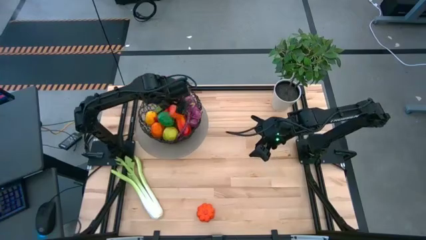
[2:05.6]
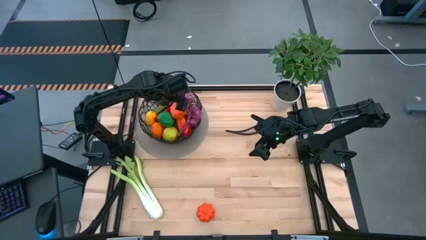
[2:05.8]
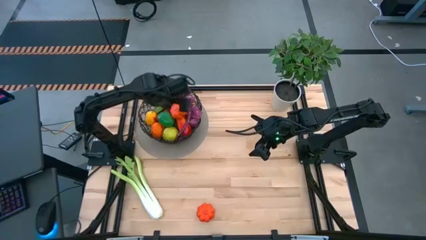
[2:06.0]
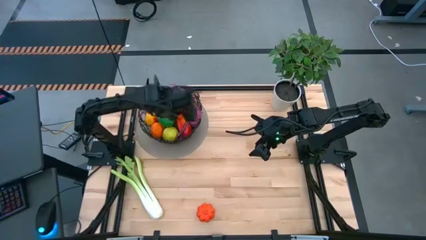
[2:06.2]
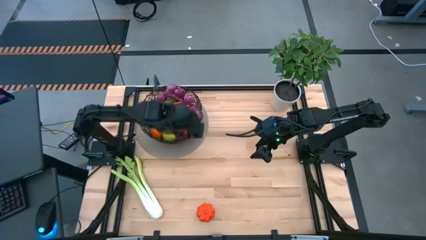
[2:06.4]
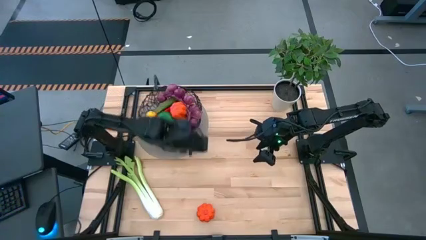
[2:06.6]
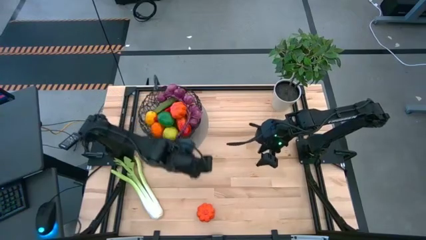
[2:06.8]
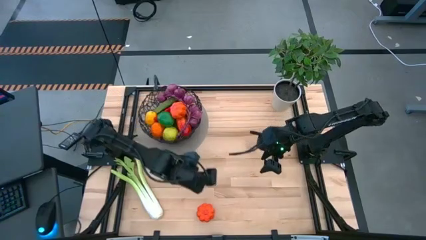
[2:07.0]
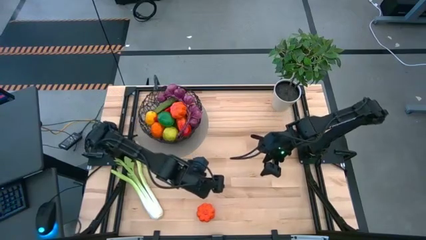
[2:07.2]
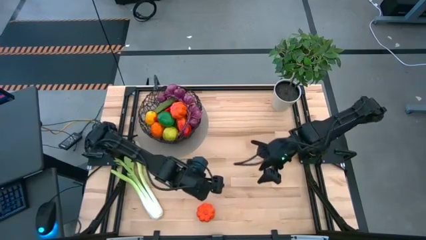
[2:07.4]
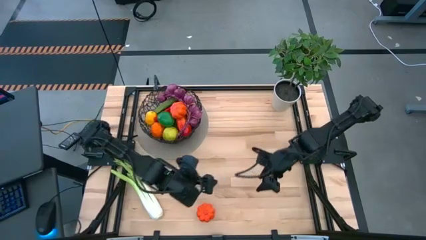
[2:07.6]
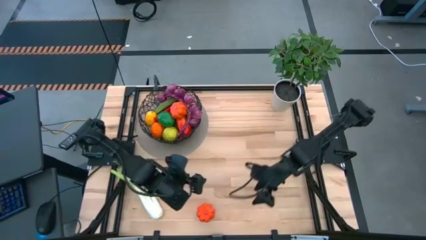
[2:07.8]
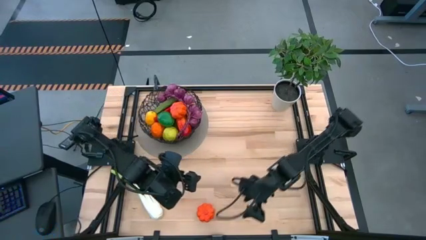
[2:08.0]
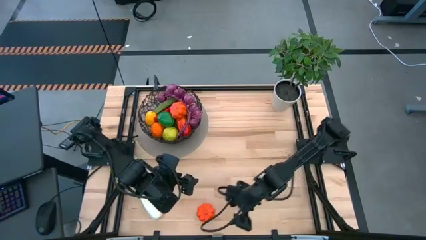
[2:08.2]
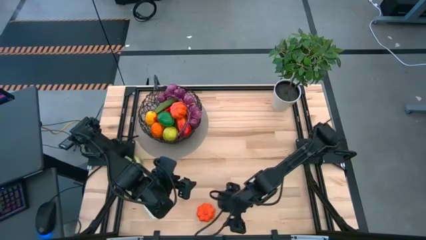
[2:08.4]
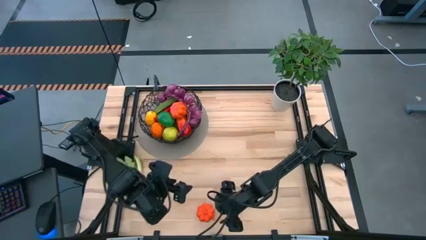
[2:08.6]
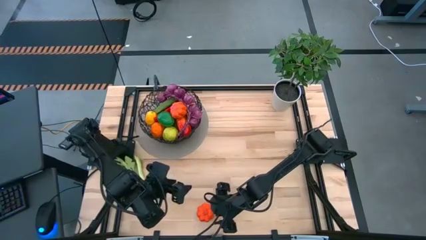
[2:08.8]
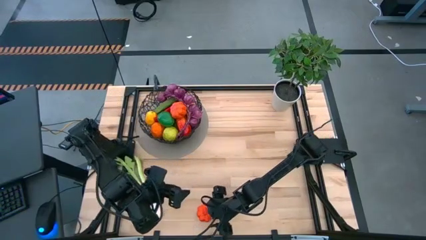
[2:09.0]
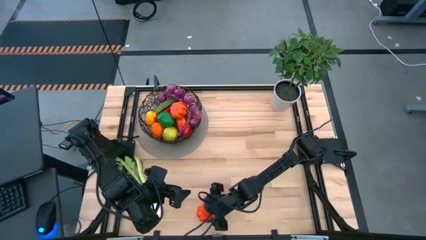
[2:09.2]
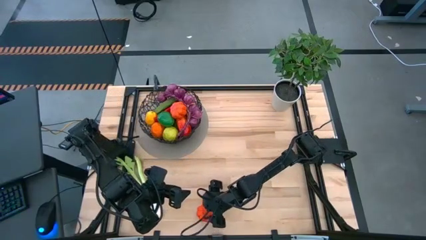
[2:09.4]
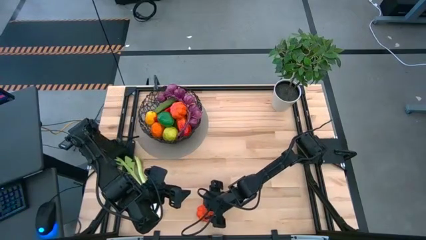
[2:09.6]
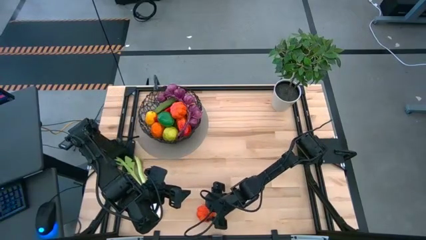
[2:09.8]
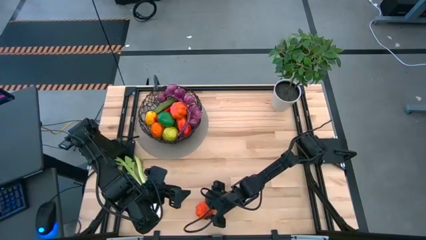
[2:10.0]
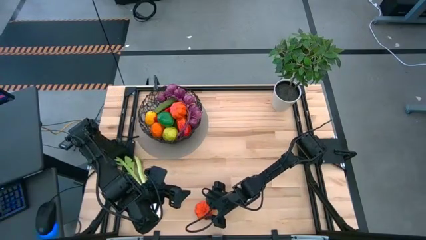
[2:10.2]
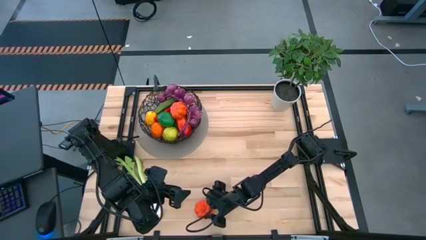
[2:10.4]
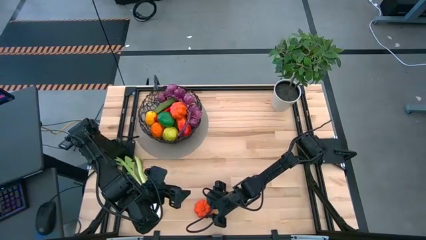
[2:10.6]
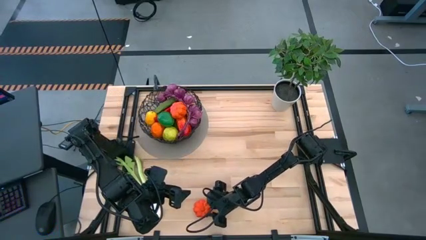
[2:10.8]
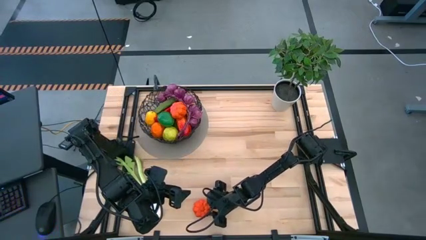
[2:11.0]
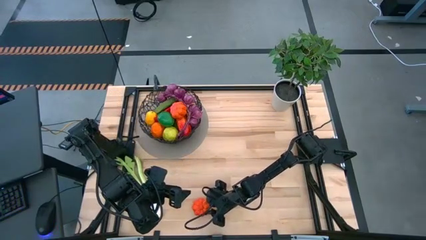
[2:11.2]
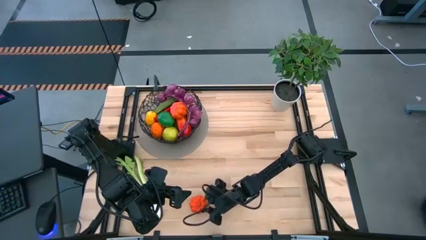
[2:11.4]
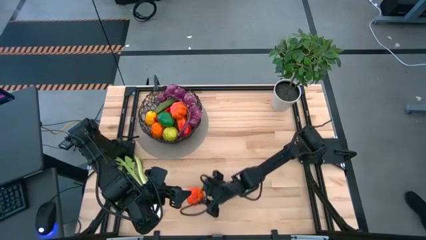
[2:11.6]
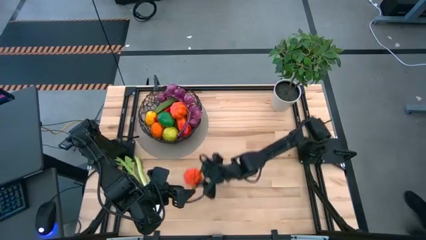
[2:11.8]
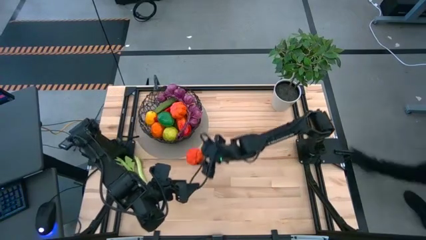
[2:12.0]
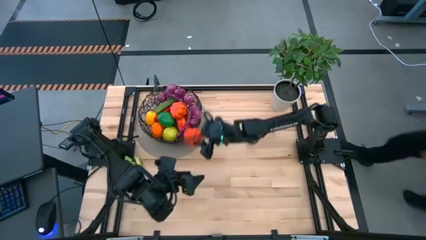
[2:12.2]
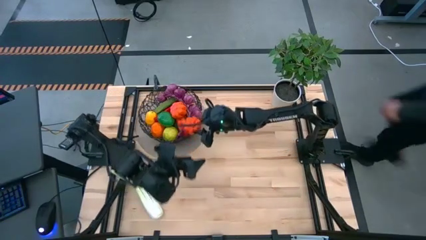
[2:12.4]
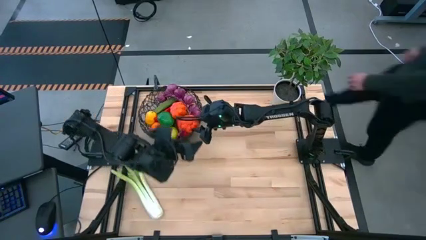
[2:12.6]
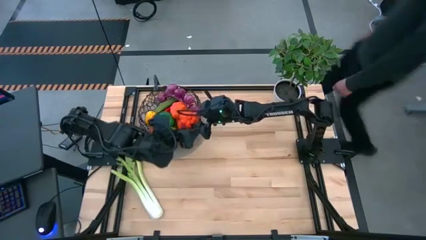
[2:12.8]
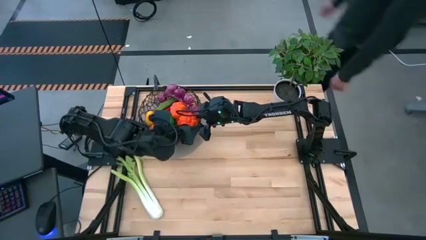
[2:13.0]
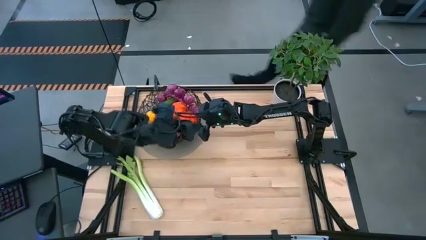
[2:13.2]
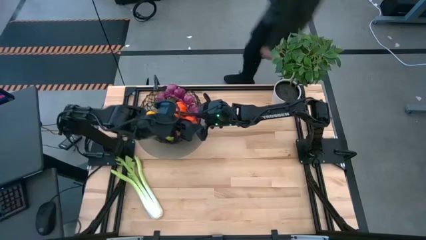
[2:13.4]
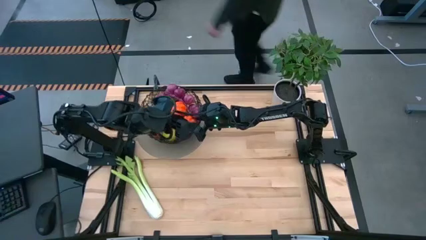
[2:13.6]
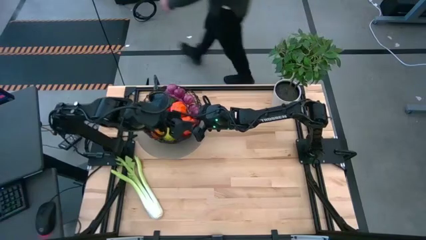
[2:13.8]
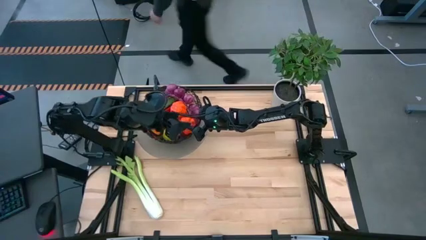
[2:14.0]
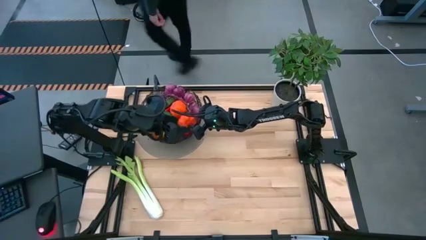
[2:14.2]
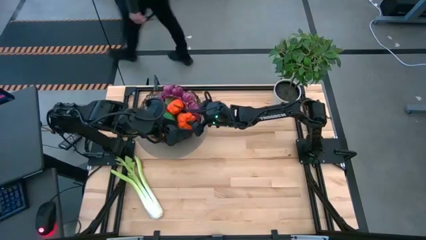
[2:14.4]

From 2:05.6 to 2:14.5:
Task: Build produce basket
Put the orange pumpkin into the black wire basket

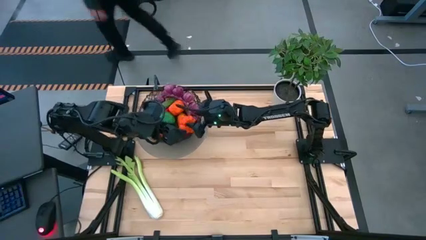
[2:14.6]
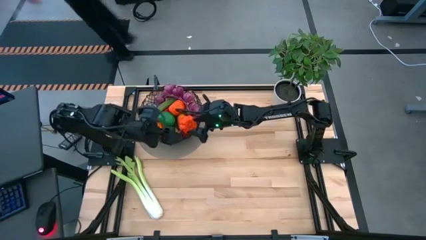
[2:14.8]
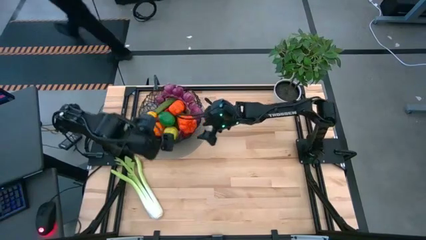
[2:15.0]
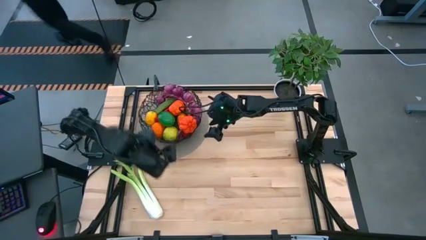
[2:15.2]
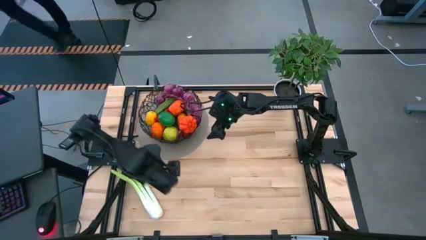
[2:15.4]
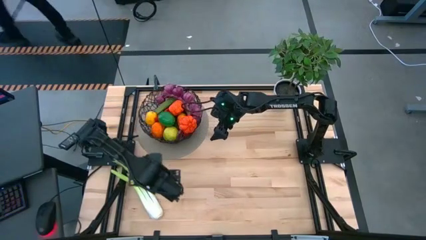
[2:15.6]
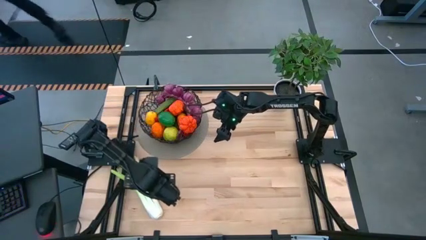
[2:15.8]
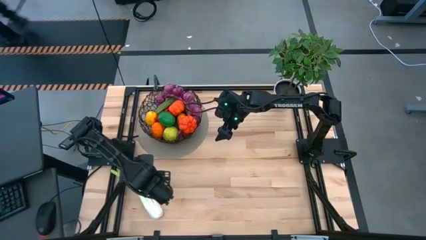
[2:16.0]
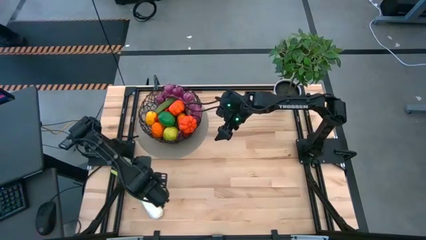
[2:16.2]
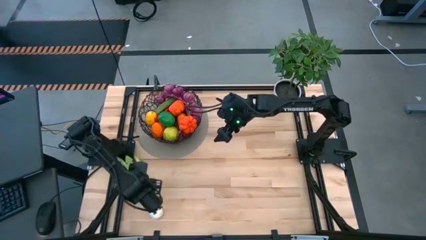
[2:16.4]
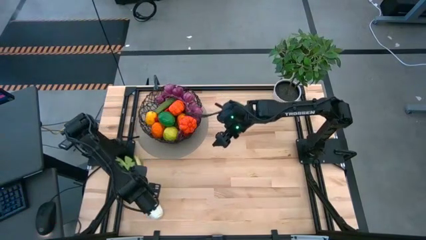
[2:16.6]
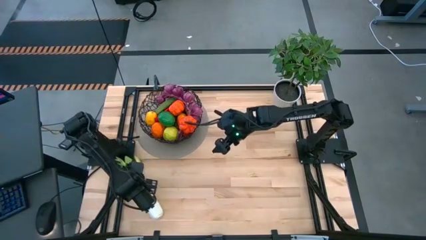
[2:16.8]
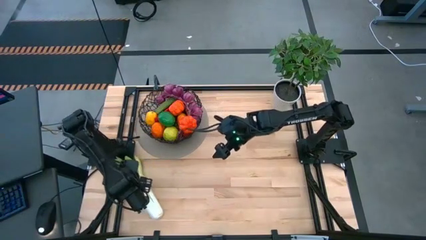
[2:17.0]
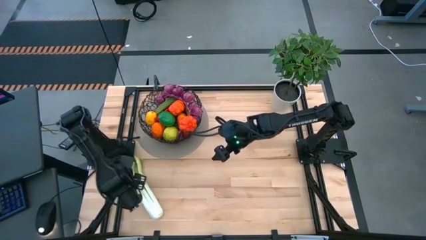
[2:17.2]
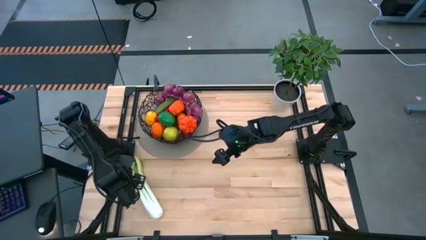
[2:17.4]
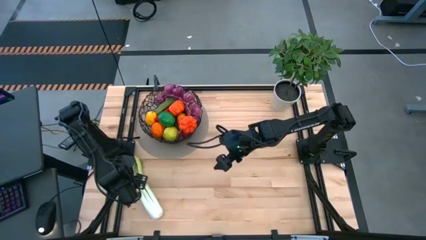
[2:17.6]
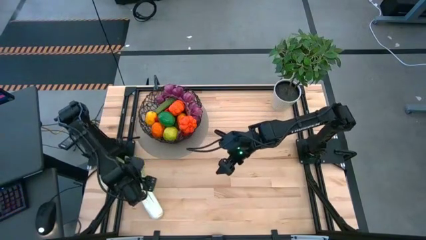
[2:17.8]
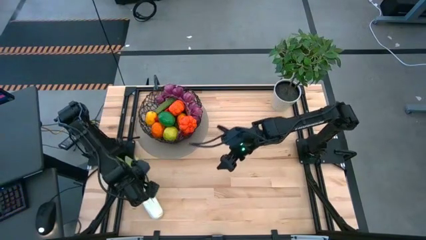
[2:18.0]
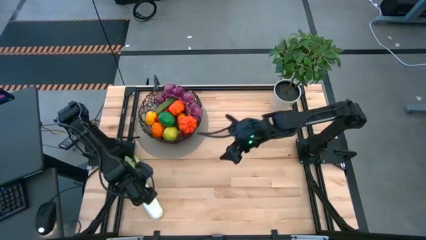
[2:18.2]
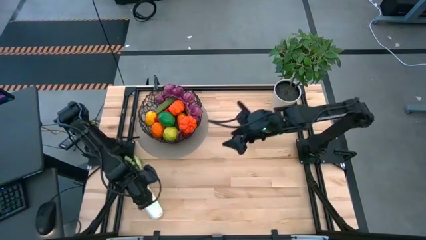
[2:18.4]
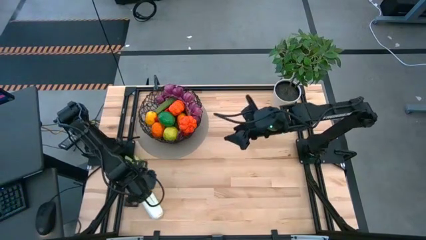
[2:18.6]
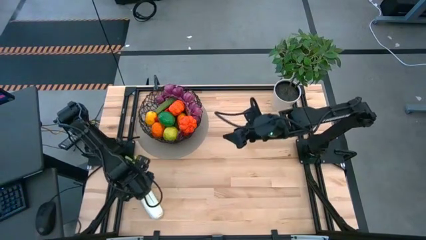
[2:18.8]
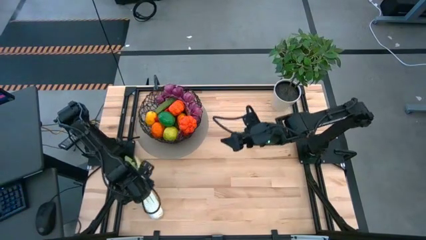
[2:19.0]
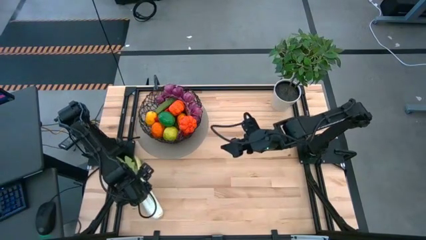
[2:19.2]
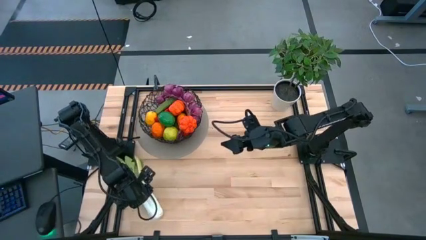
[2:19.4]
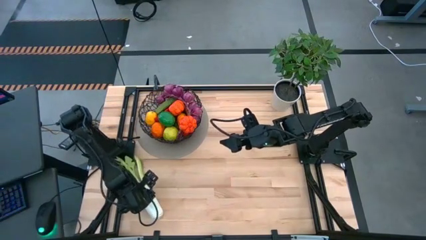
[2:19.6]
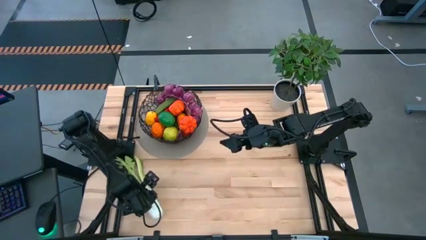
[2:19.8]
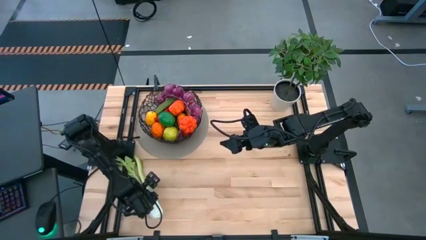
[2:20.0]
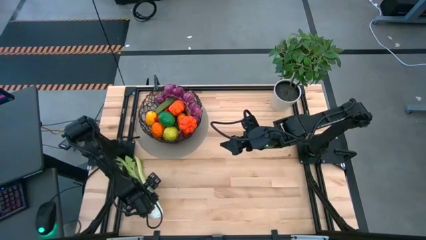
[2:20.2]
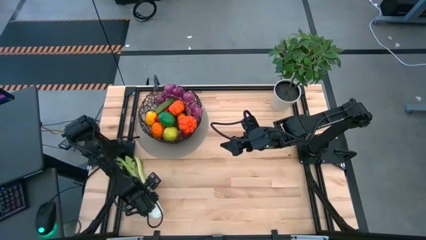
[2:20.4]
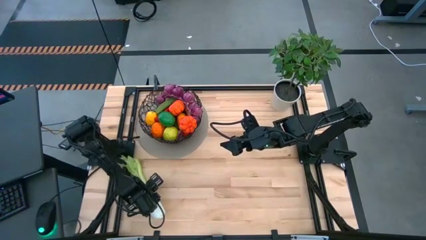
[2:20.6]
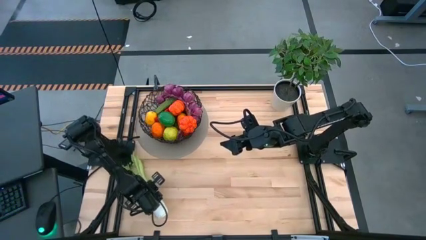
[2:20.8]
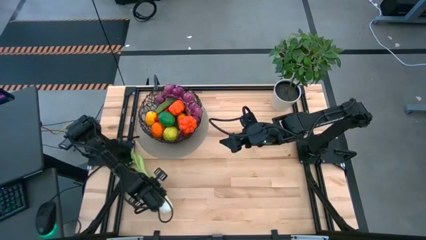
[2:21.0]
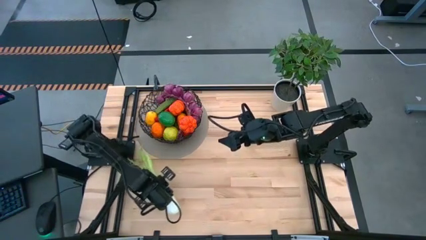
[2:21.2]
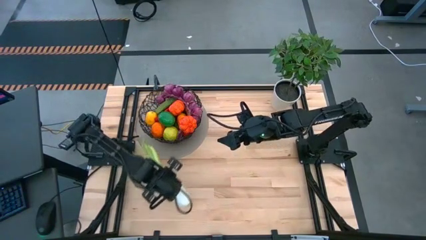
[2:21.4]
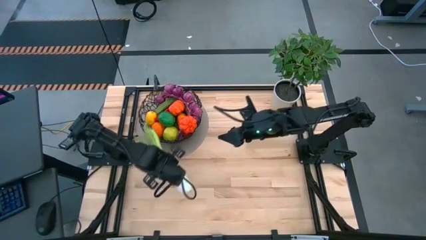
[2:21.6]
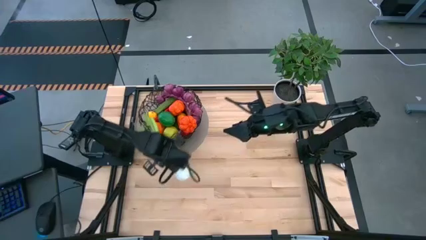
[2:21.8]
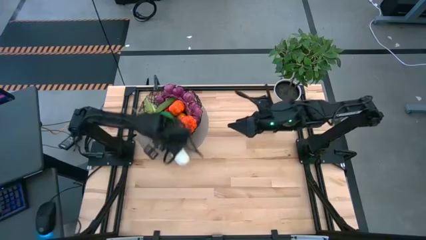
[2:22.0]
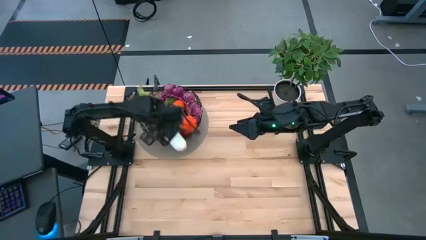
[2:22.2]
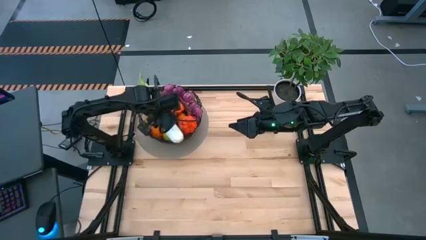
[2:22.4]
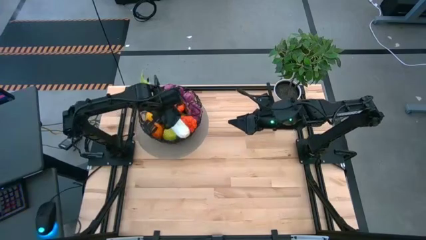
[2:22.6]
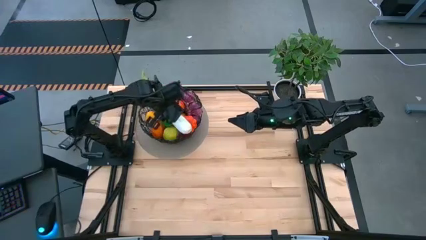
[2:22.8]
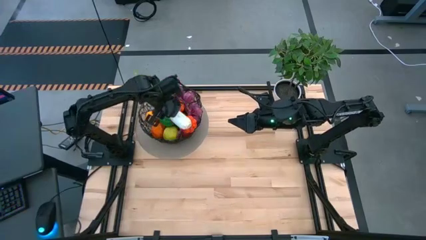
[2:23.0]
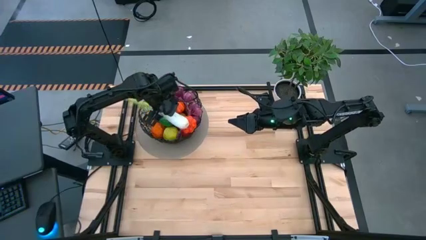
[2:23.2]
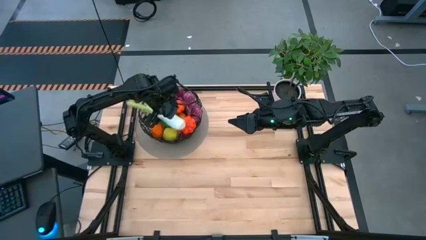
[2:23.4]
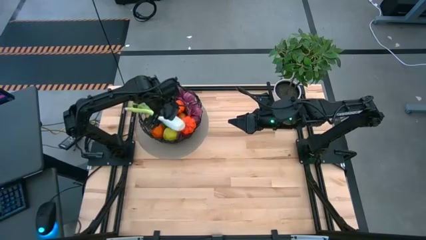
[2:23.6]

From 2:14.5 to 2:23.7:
Put the green celery into the black wire basket
